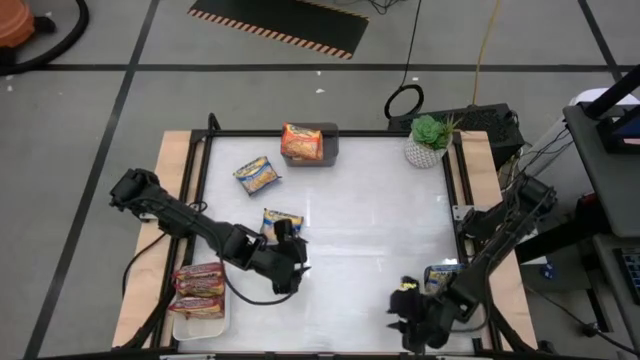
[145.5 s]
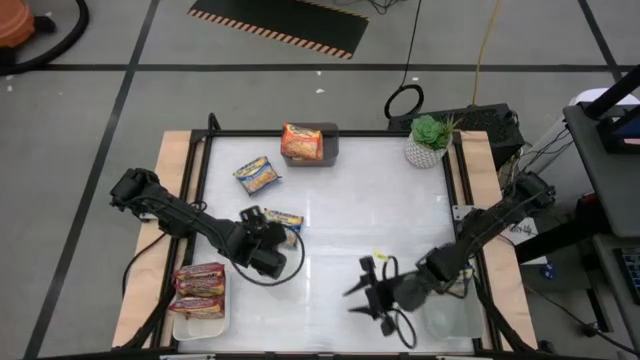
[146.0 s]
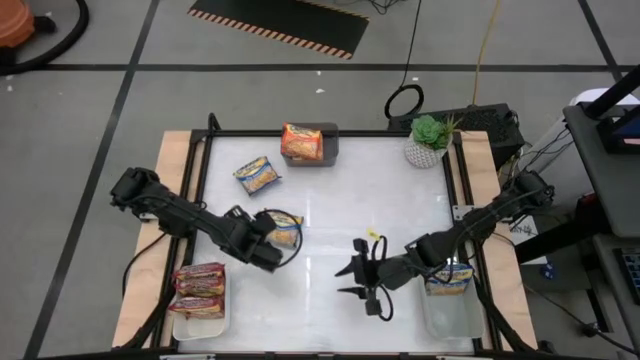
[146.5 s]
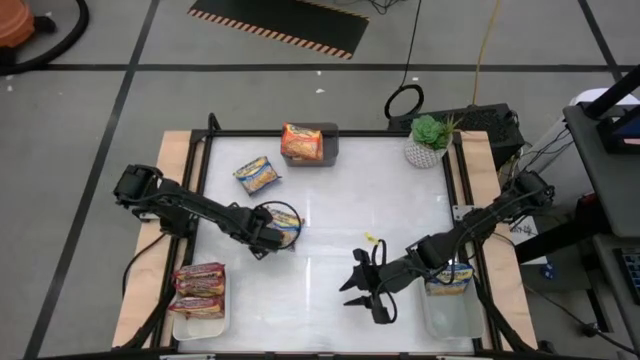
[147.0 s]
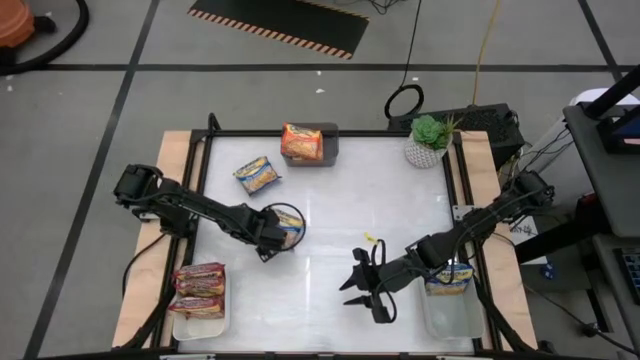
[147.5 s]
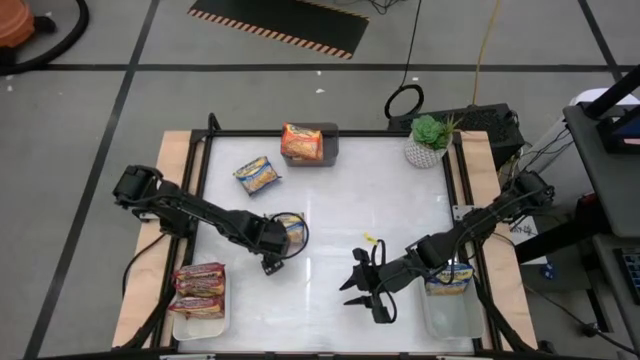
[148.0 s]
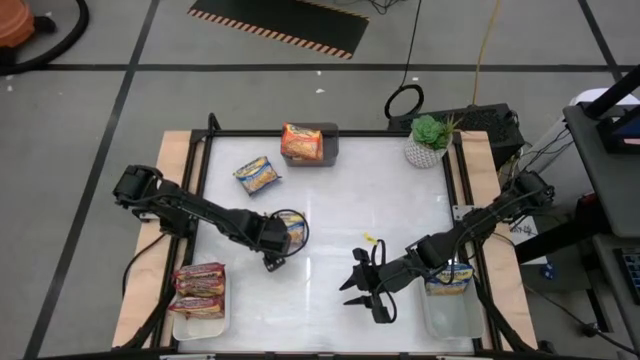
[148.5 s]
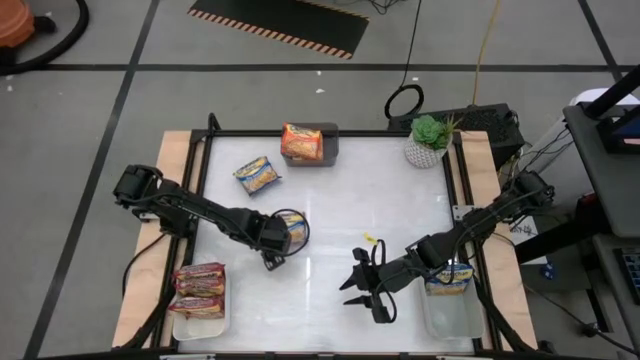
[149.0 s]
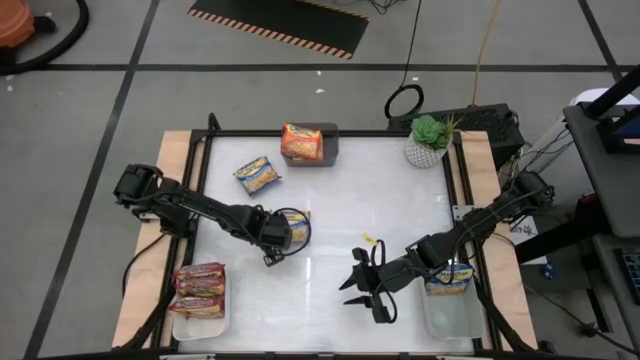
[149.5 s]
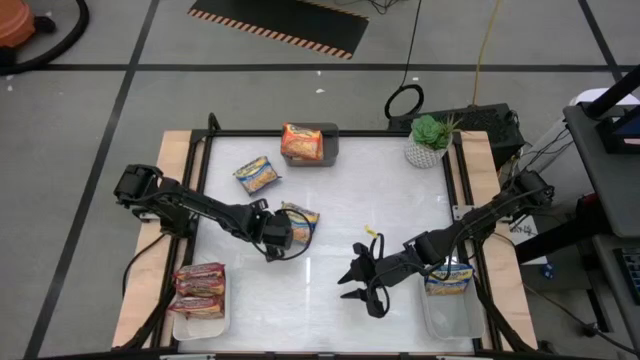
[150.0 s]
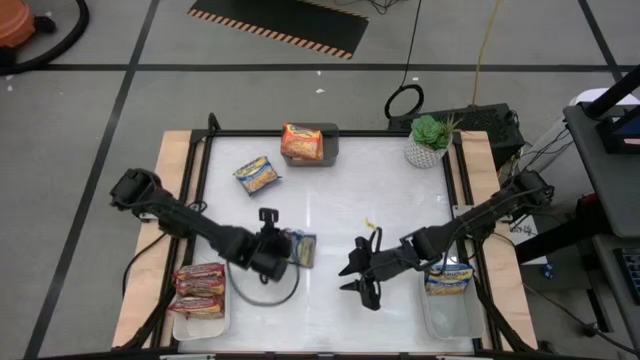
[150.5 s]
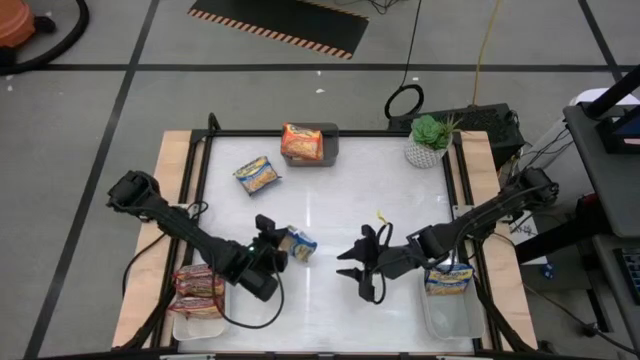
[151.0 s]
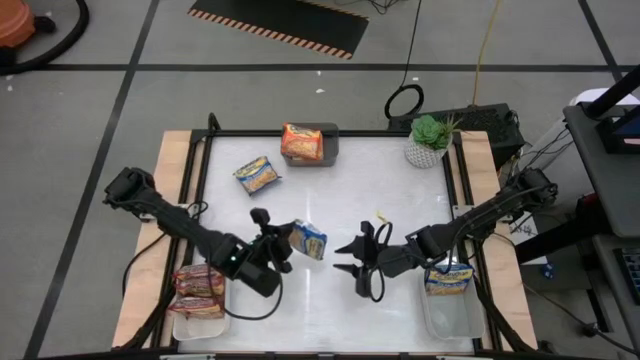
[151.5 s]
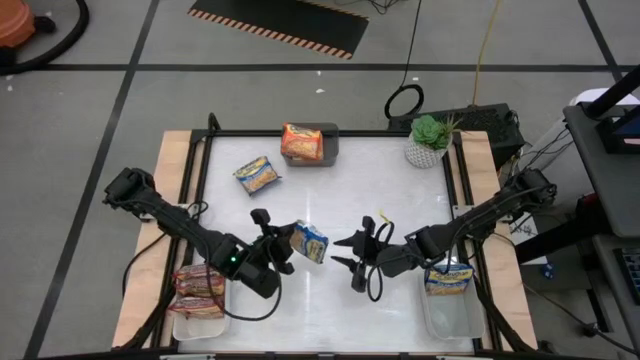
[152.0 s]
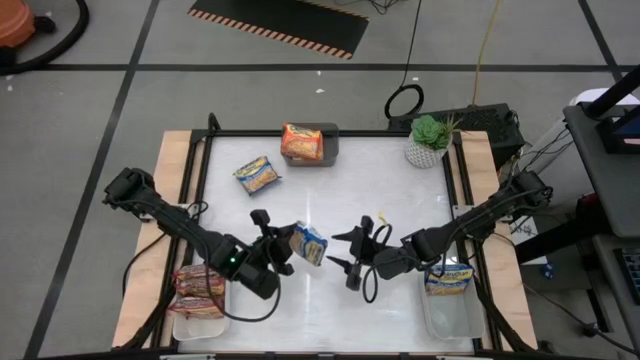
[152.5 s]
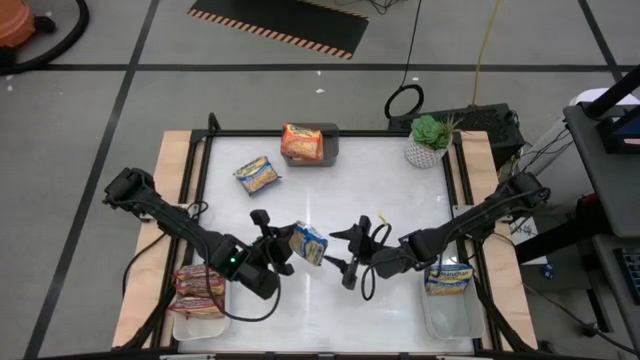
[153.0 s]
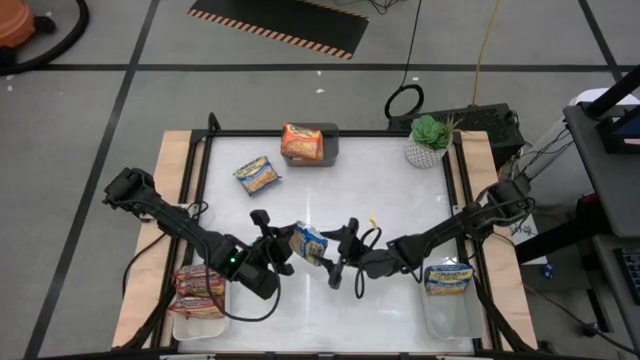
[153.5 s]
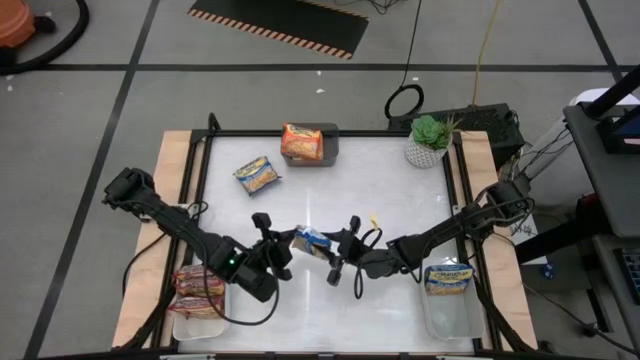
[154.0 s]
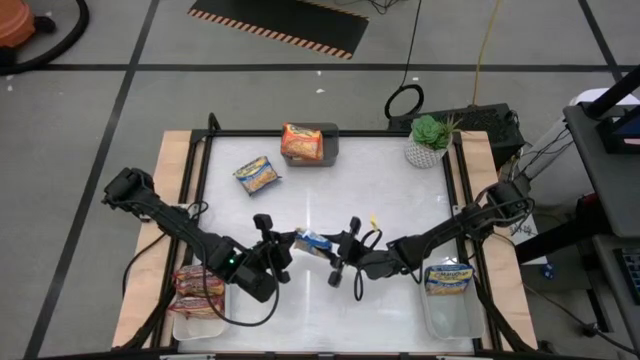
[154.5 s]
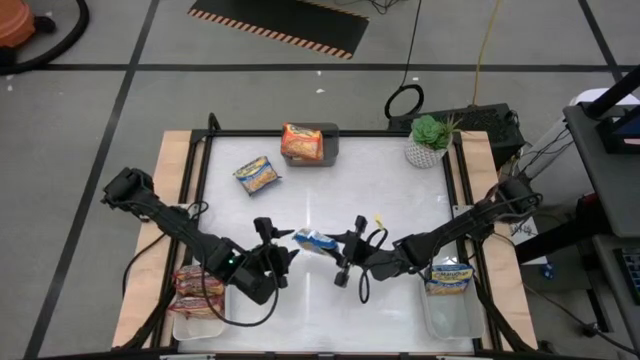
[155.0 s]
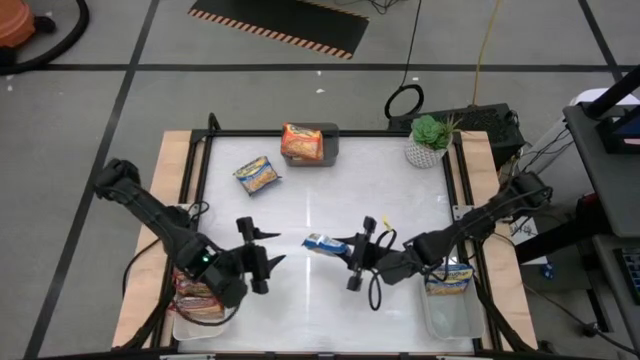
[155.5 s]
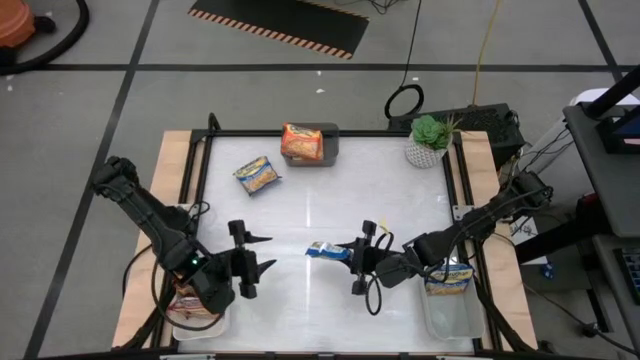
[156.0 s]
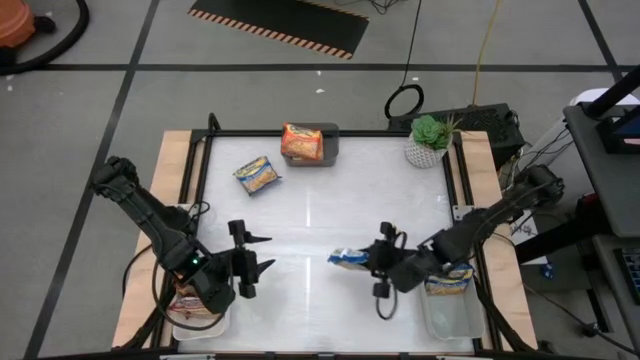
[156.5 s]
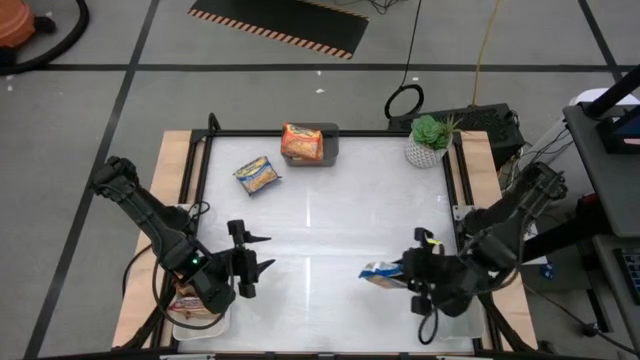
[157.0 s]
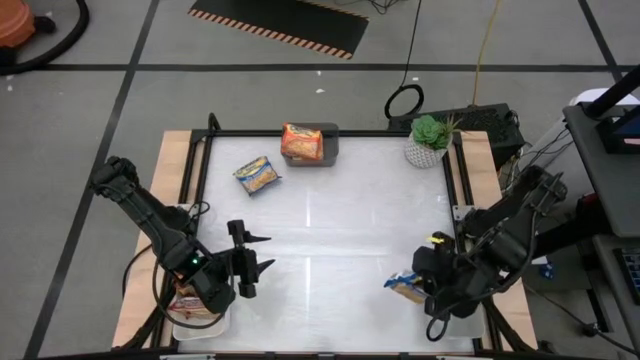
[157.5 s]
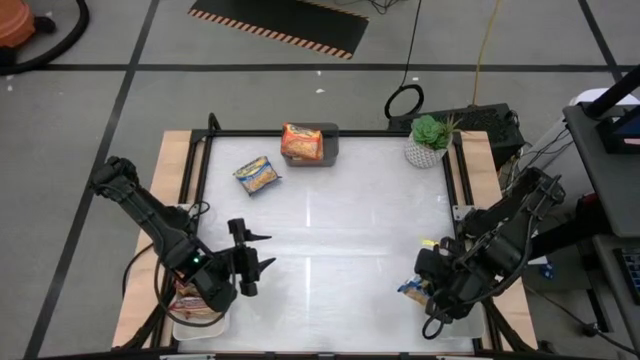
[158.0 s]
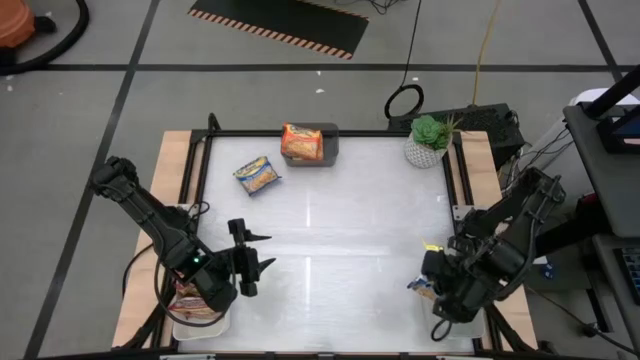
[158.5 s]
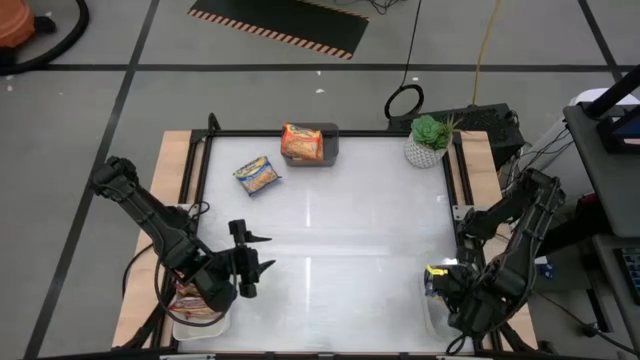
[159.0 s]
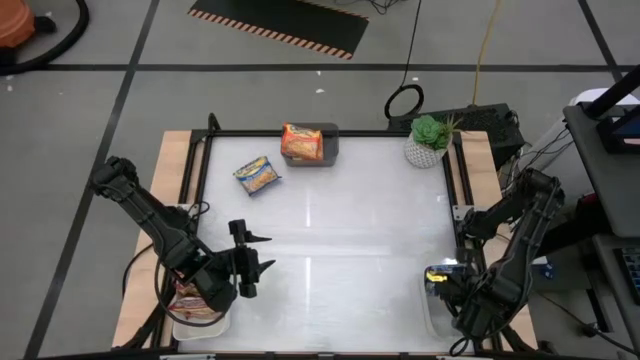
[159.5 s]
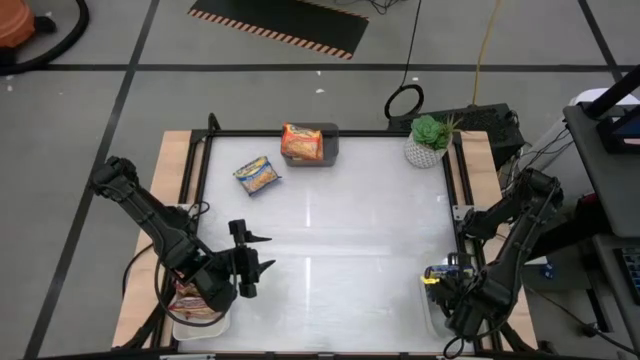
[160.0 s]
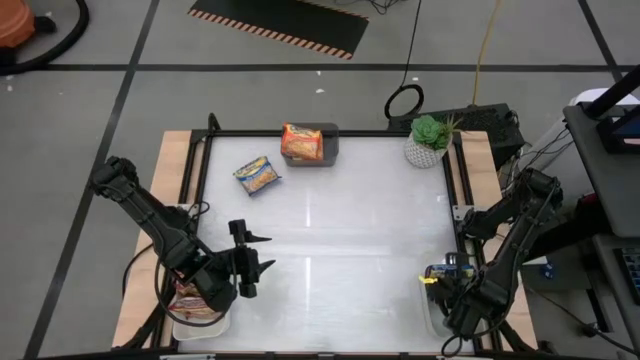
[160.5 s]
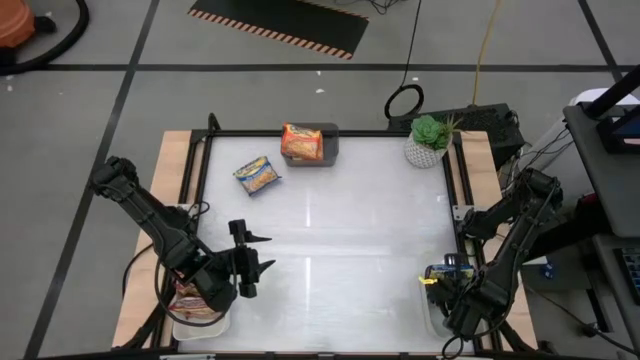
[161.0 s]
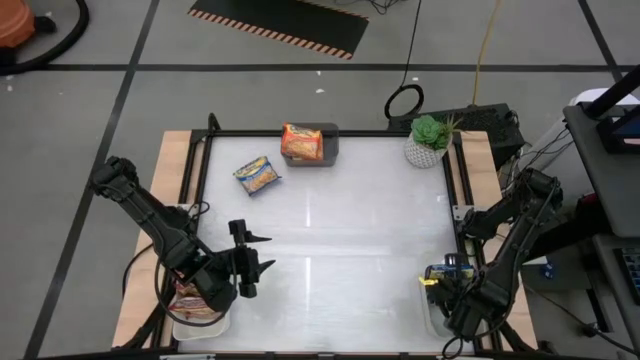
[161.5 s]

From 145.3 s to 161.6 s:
Task: Sort Maruchan noodles
Put the bottom blue noodle pack into the gray bin

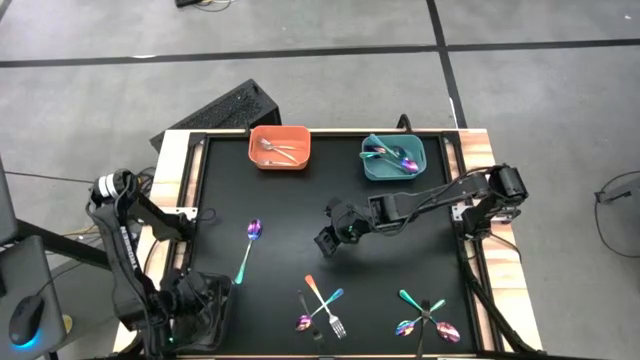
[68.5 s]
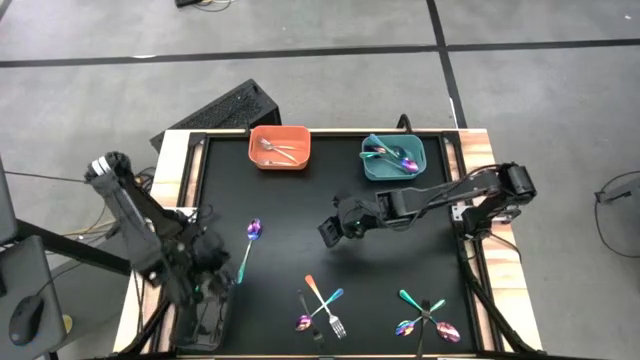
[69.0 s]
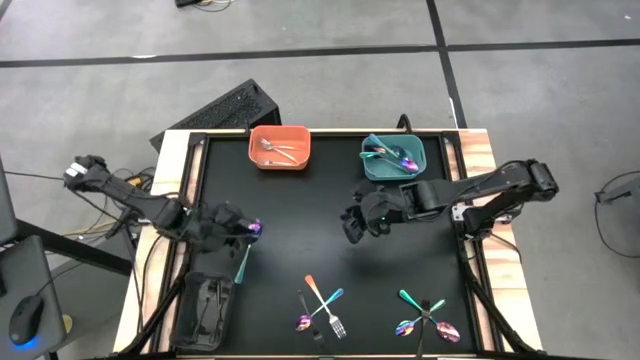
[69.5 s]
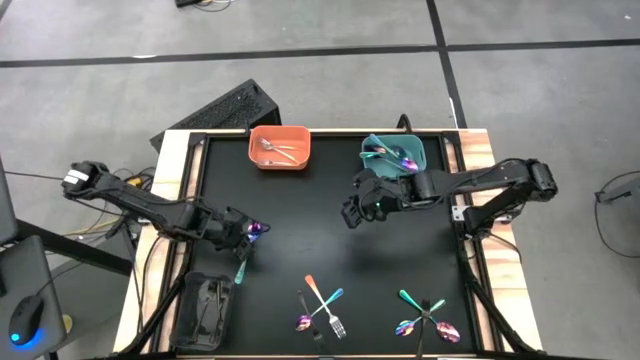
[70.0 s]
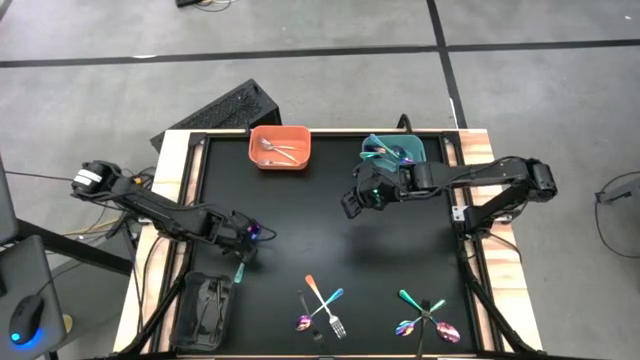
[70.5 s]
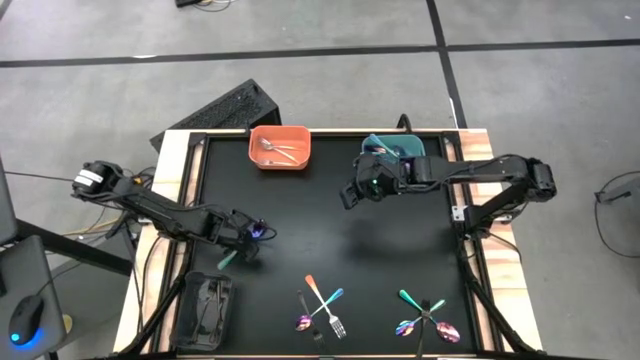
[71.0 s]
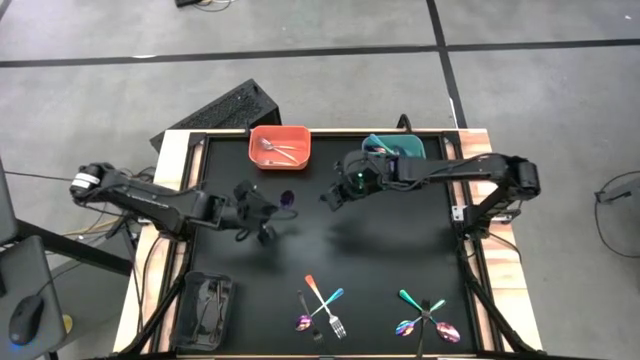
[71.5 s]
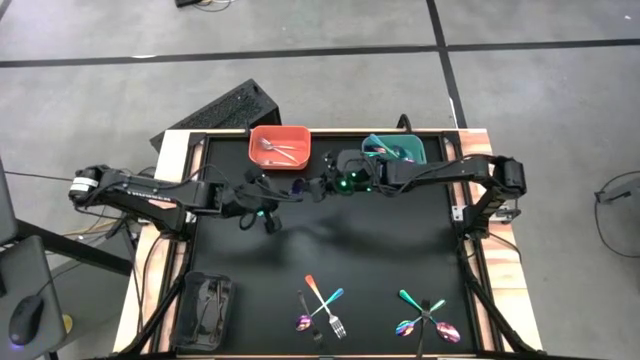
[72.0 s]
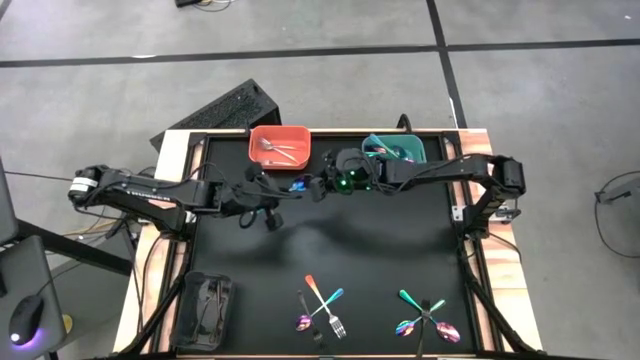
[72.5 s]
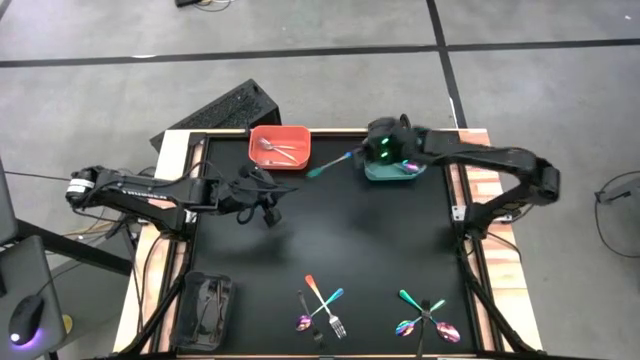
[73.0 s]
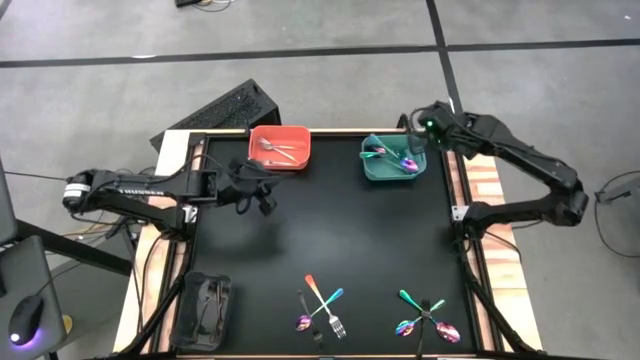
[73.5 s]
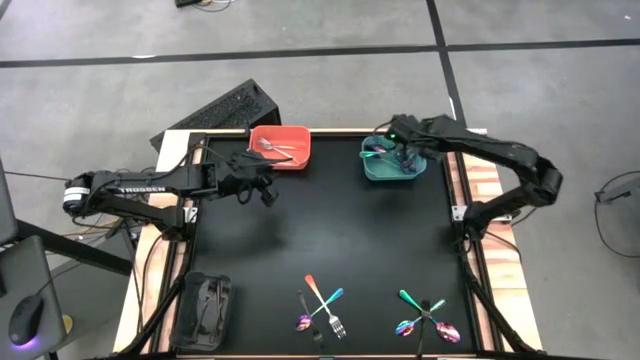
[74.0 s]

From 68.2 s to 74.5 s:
Task: Sort silverware by color (type)
Put the blue spoon into the blue bin
